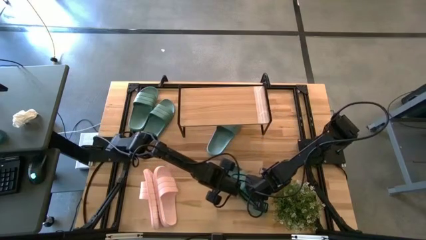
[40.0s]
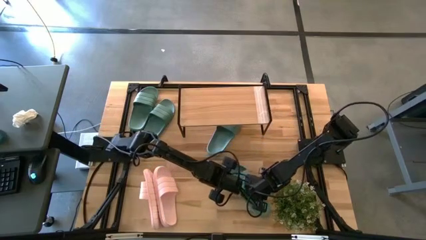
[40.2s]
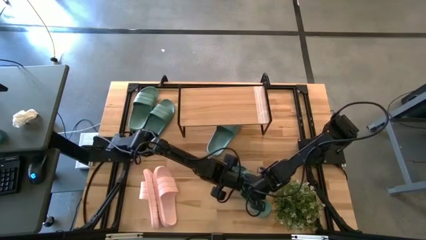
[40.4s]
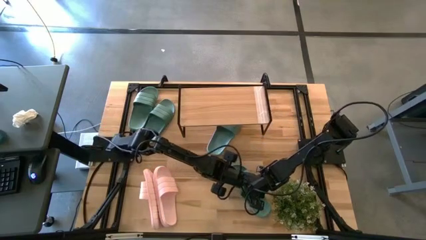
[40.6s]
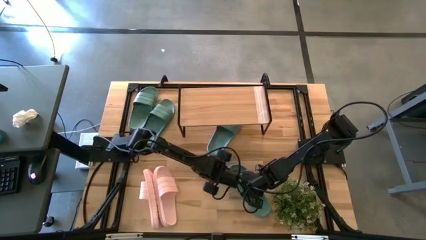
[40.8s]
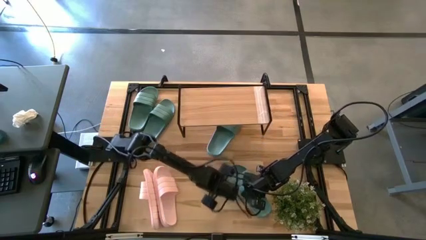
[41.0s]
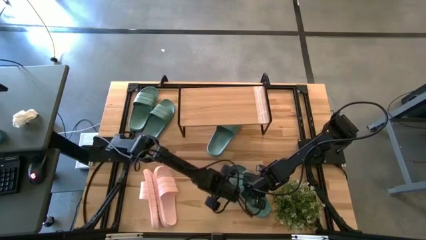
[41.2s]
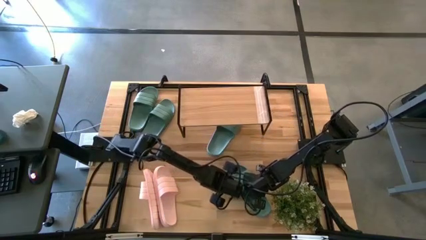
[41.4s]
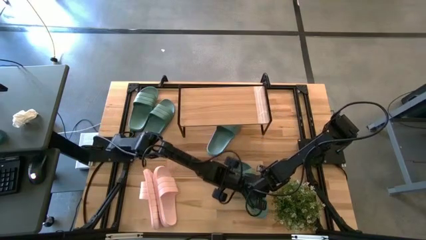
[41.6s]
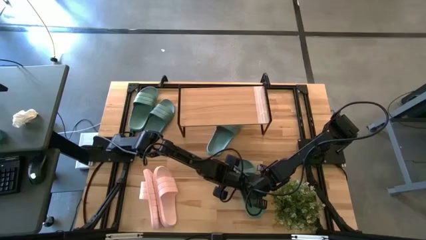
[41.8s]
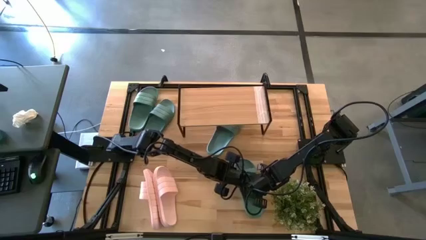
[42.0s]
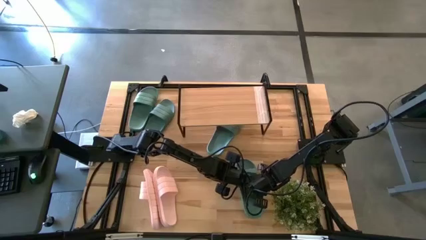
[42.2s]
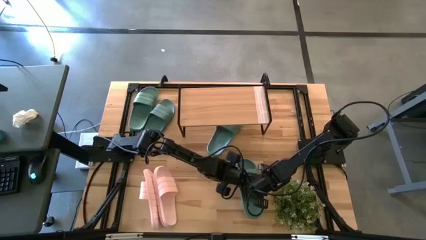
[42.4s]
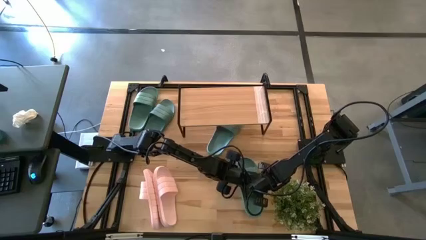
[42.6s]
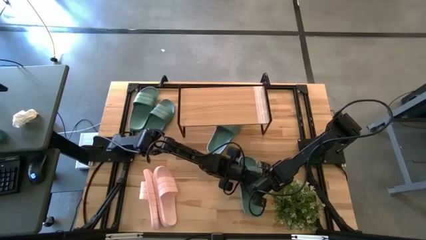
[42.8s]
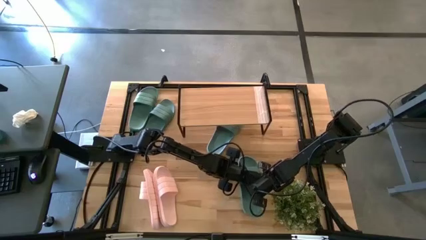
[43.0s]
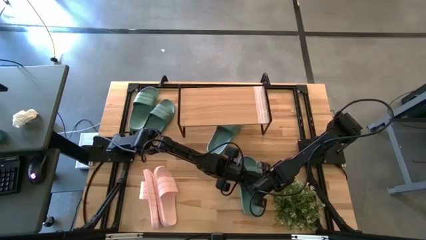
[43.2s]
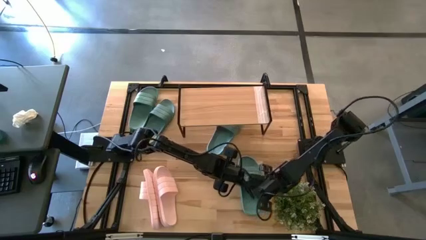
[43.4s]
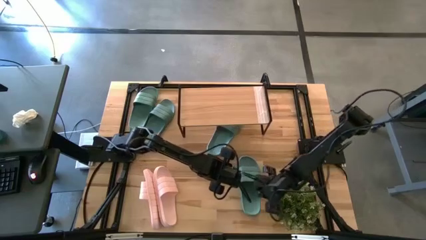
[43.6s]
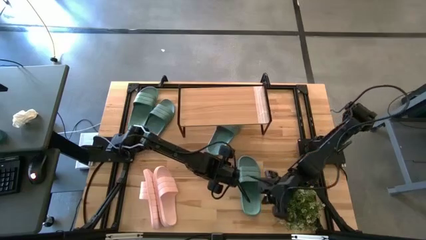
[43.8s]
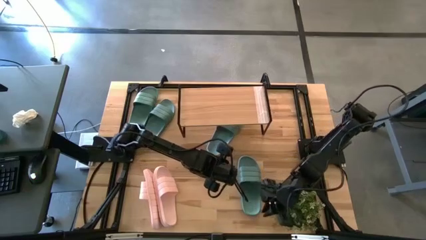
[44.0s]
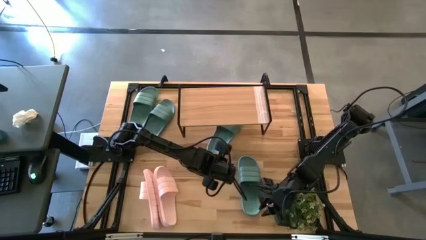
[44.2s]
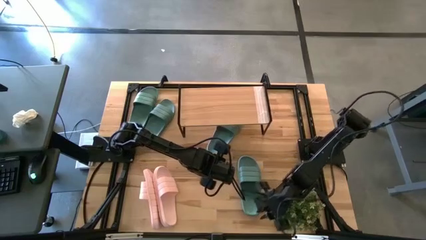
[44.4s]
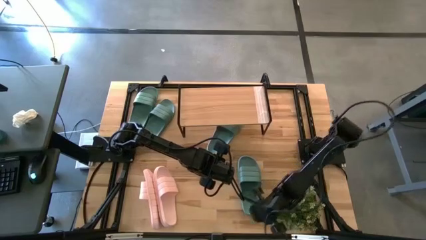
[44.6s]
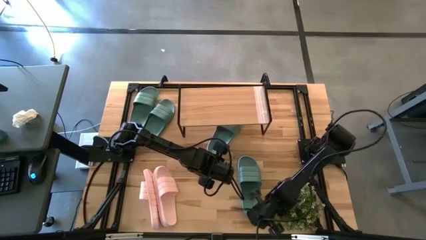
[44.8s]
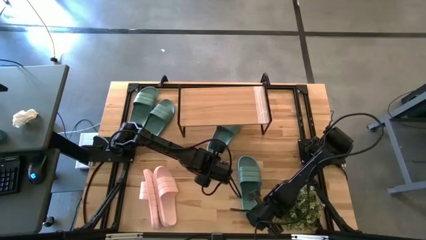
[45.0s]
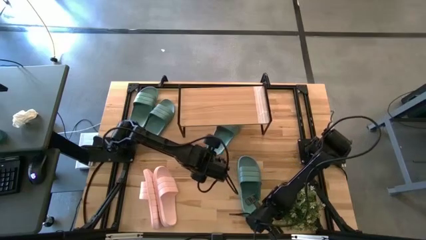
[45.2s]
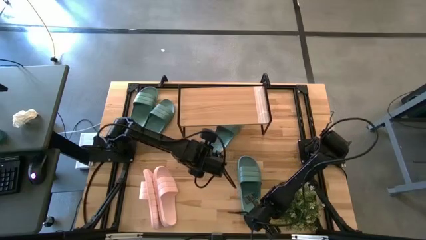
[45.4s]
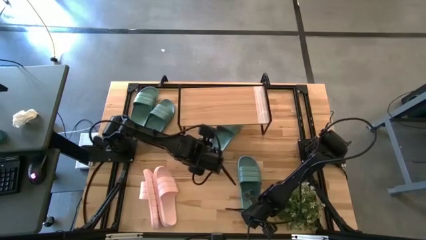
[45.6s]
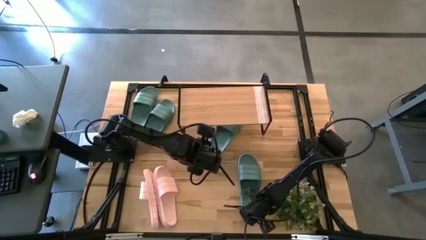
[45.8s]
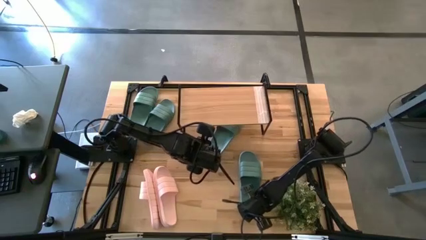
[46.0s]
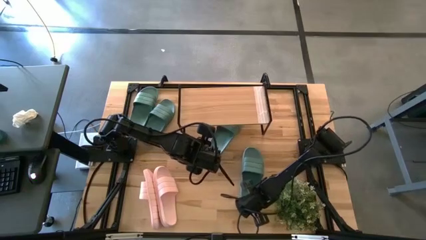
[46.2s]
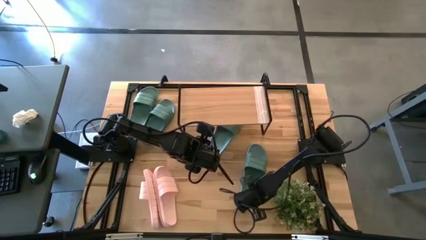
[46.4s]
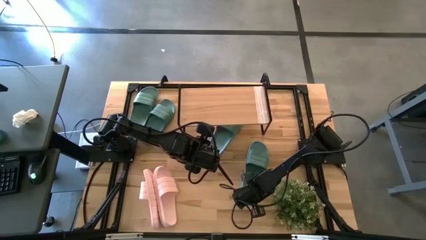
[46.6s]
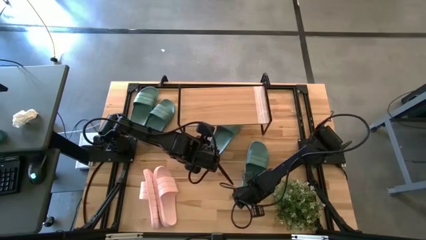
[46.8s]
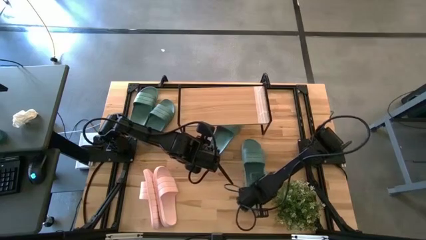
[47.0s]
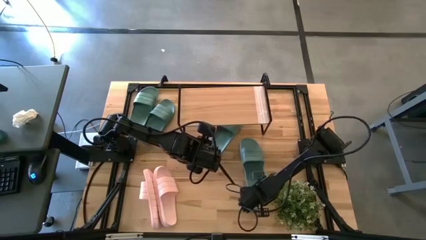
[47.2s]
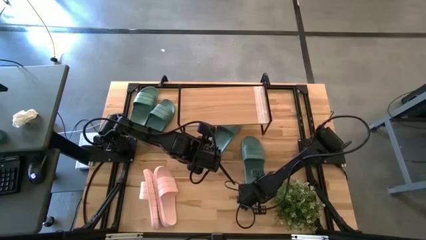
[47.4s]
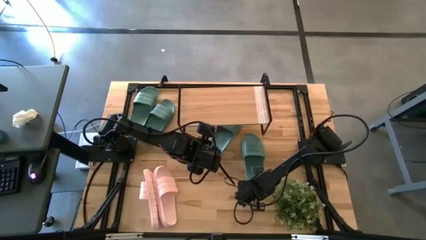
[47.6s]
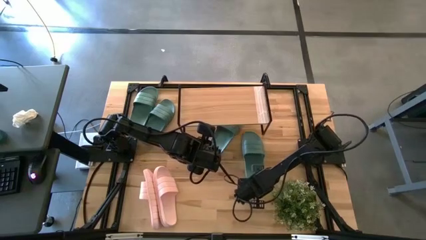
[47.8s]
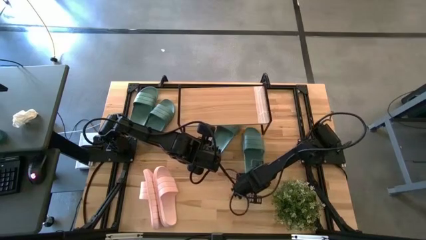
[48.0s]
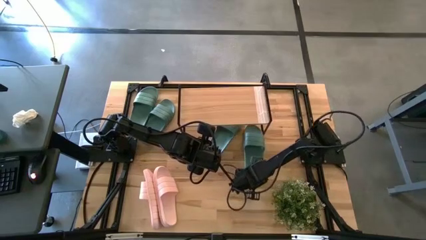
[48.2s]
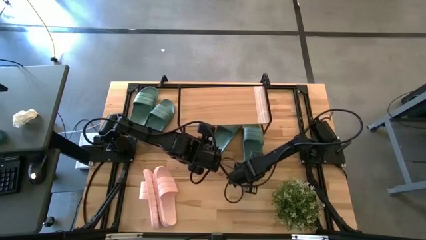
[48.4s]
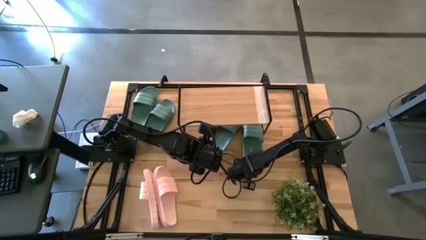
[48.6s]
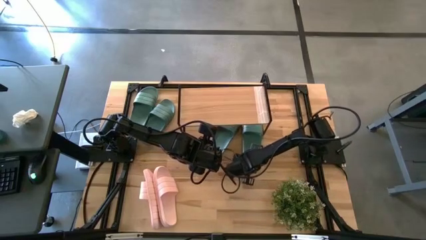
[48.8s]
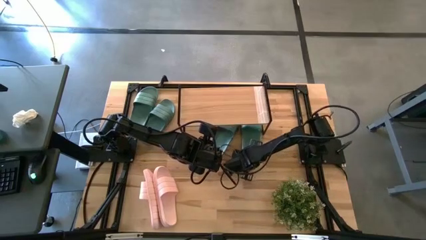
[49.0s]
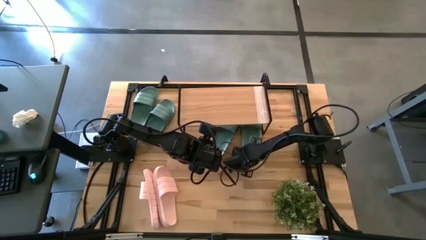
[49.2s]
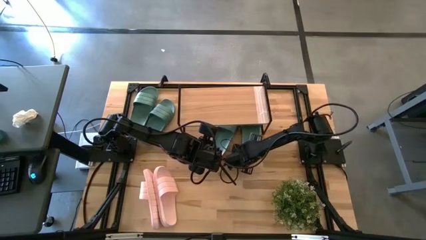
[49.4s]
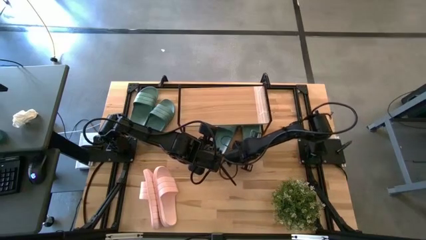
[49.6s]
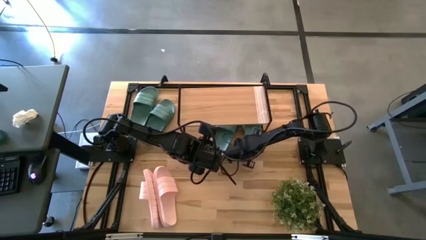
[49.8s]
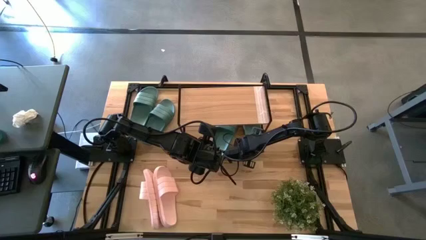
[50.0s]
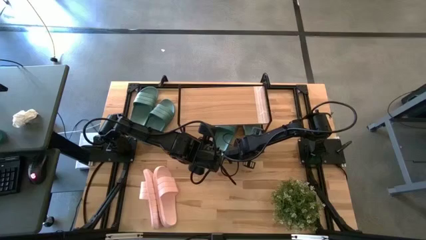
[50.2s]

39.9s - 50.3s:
Task: Pick and place slides into the shelf
Put the green slide under the shelf
